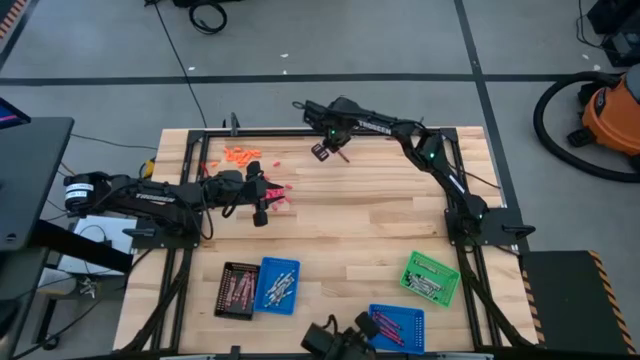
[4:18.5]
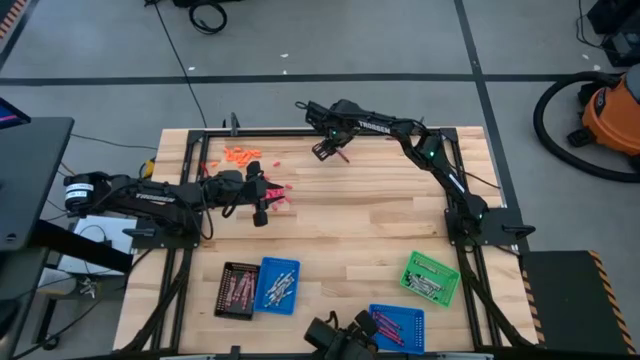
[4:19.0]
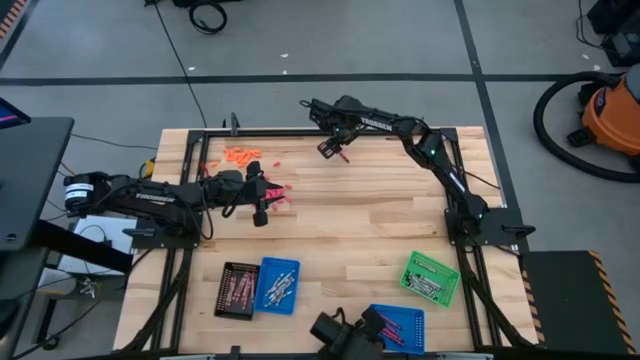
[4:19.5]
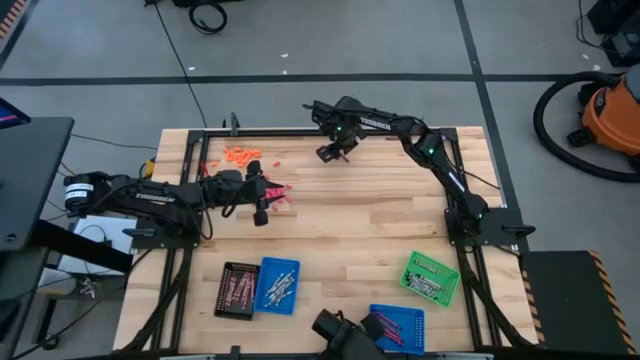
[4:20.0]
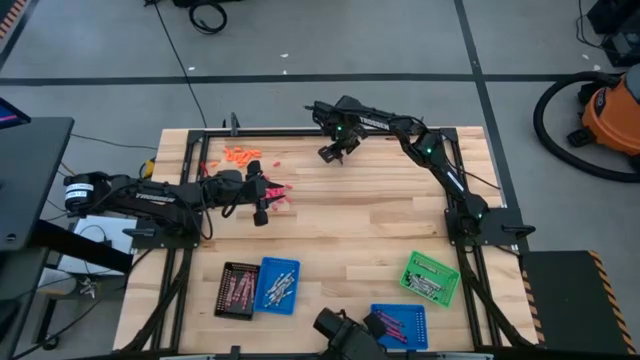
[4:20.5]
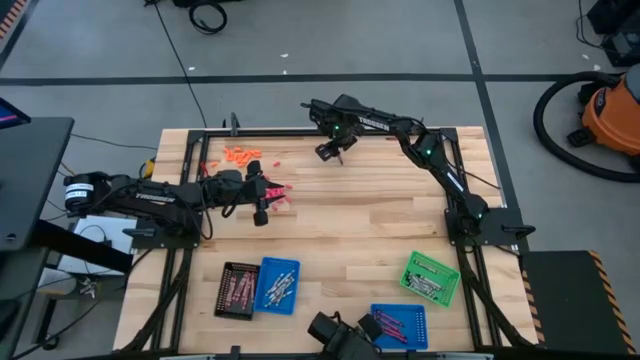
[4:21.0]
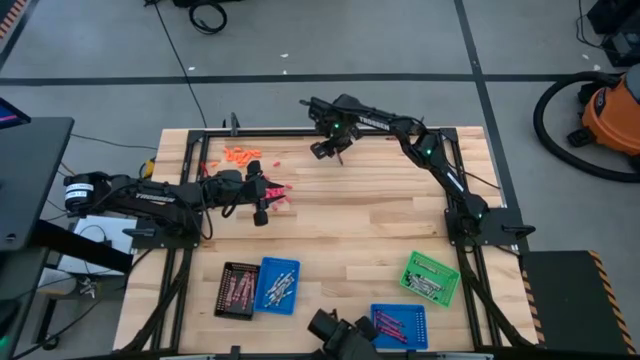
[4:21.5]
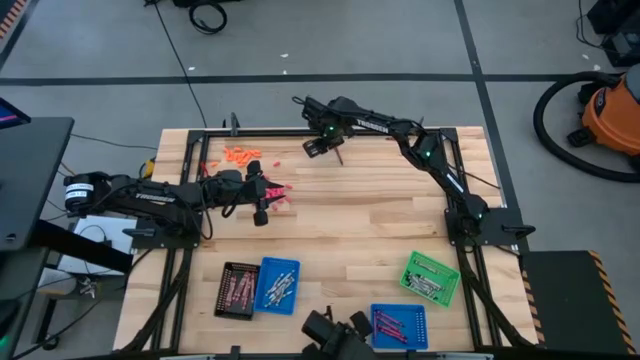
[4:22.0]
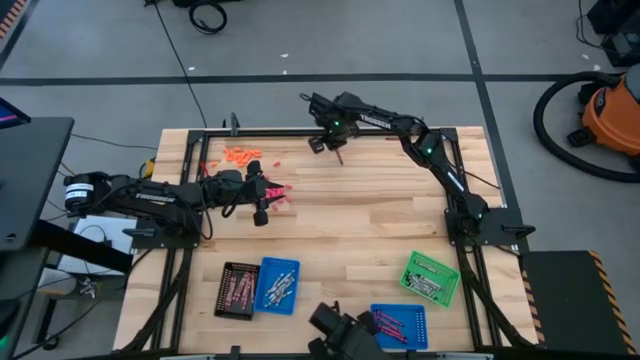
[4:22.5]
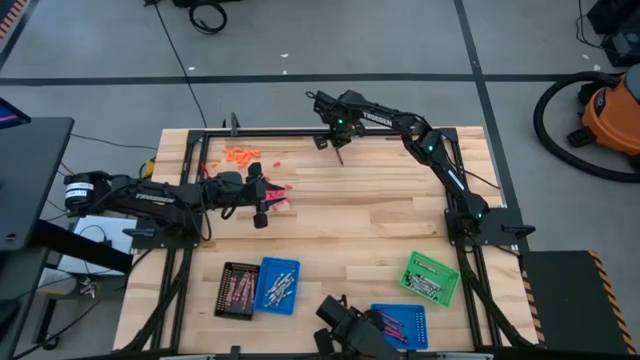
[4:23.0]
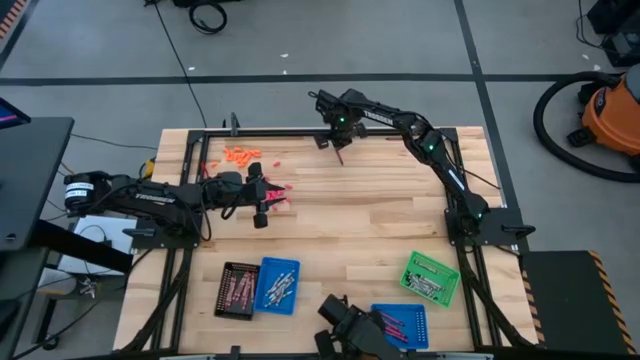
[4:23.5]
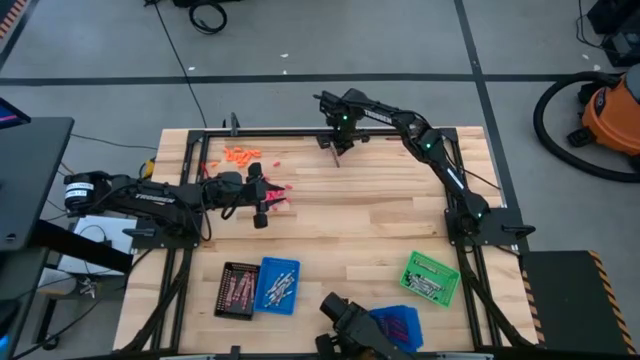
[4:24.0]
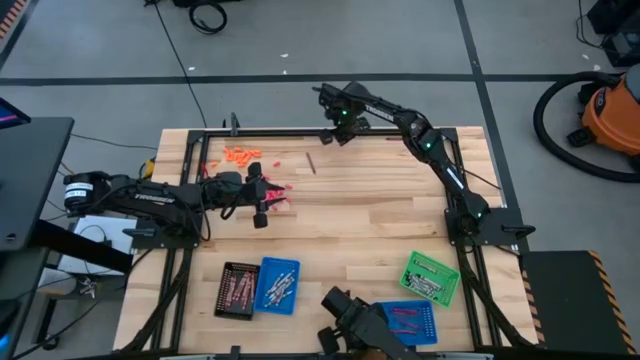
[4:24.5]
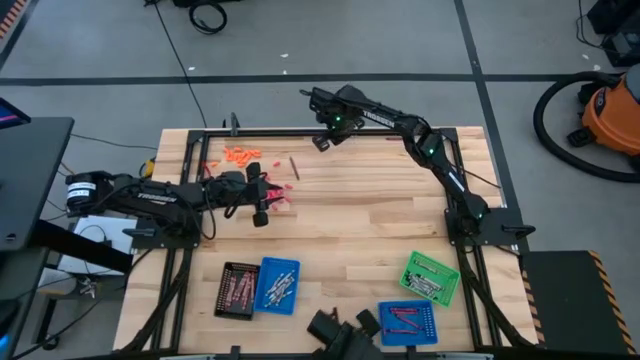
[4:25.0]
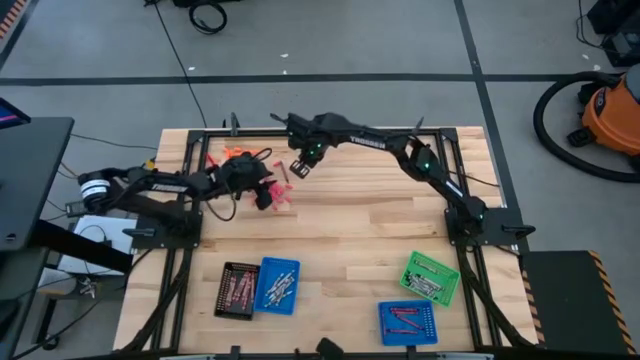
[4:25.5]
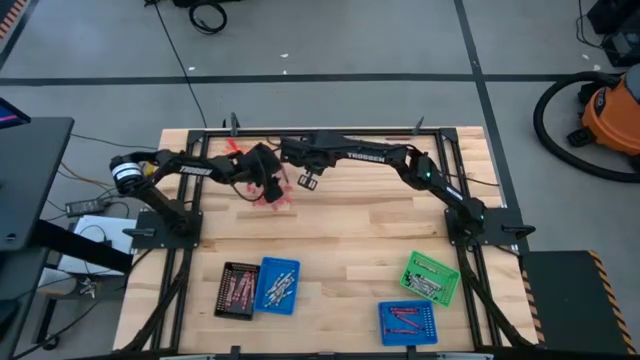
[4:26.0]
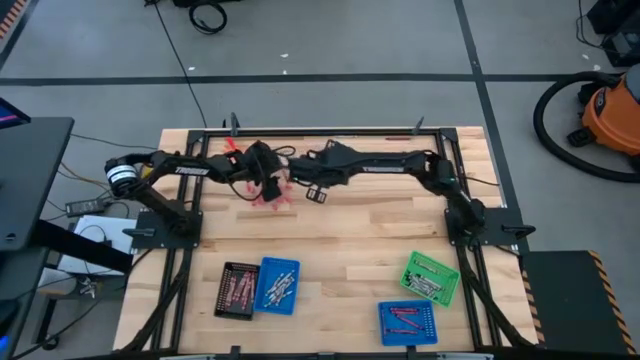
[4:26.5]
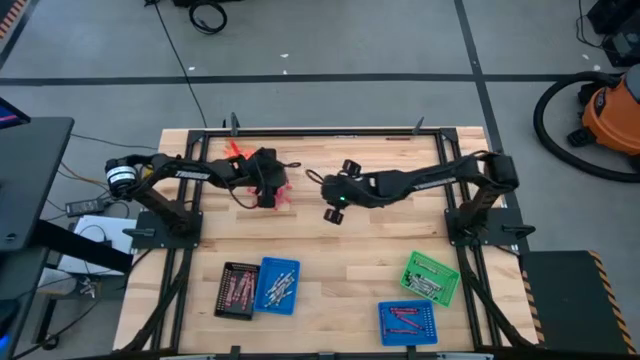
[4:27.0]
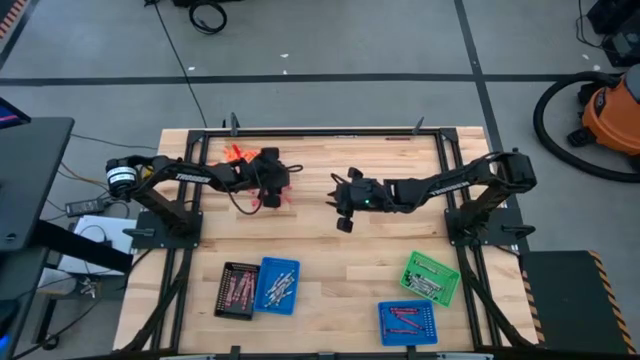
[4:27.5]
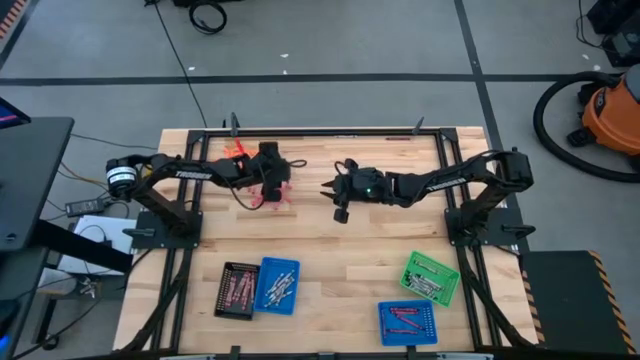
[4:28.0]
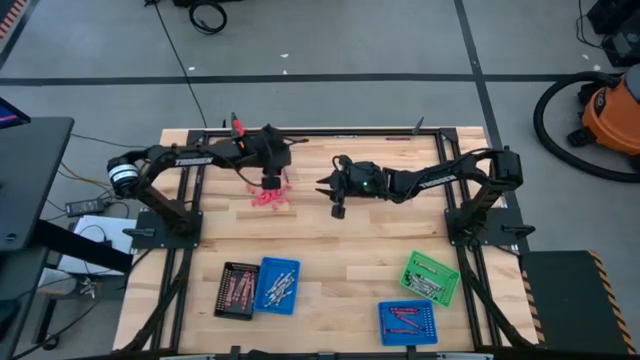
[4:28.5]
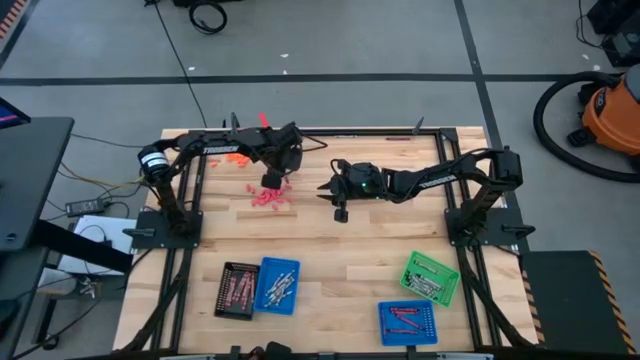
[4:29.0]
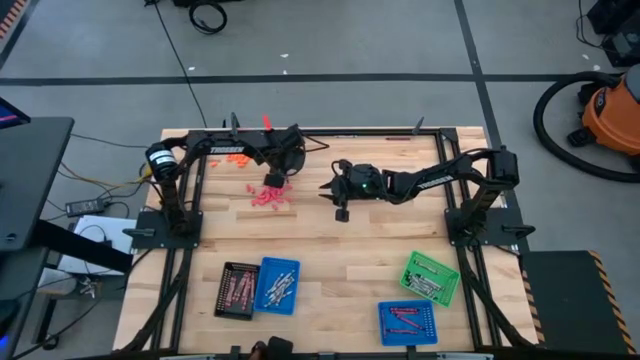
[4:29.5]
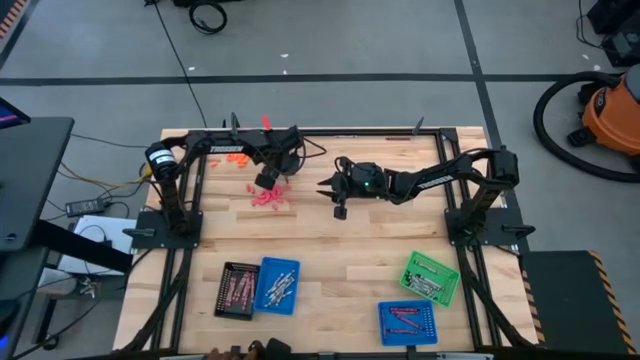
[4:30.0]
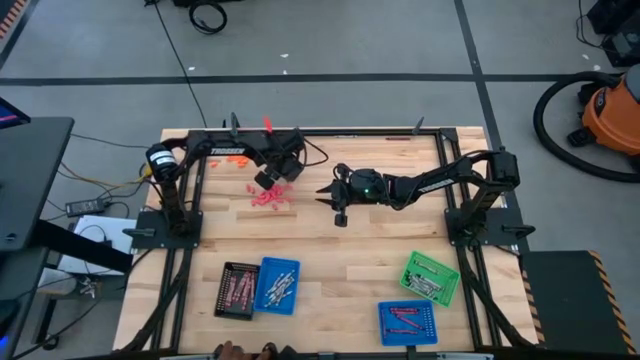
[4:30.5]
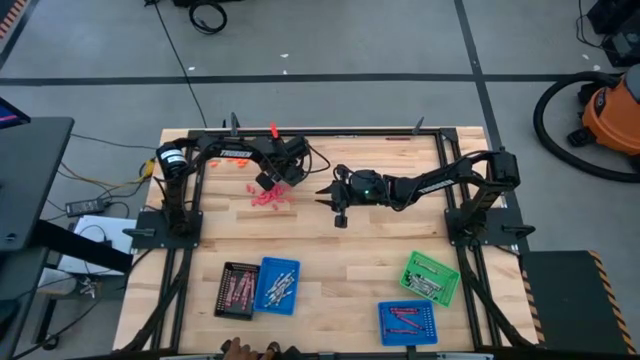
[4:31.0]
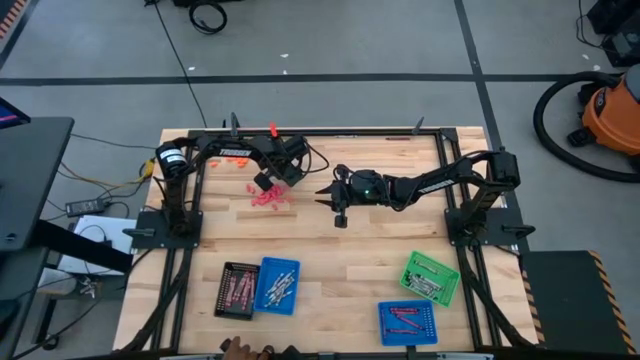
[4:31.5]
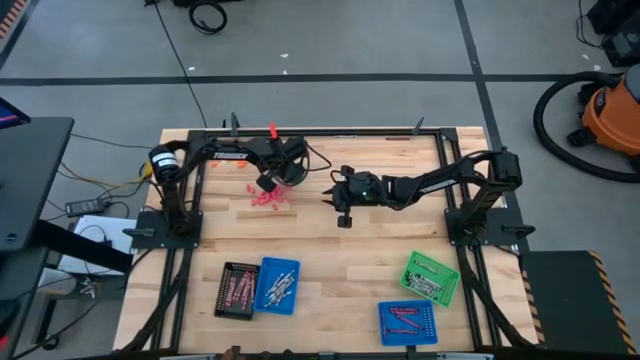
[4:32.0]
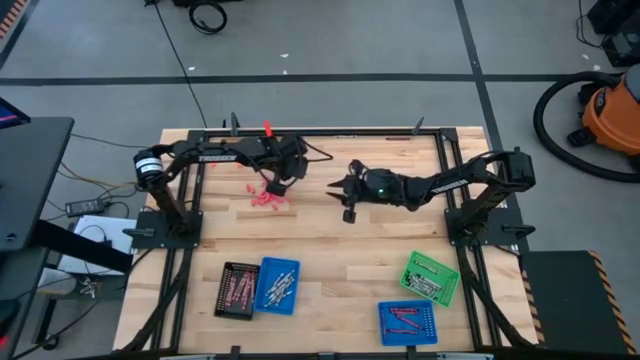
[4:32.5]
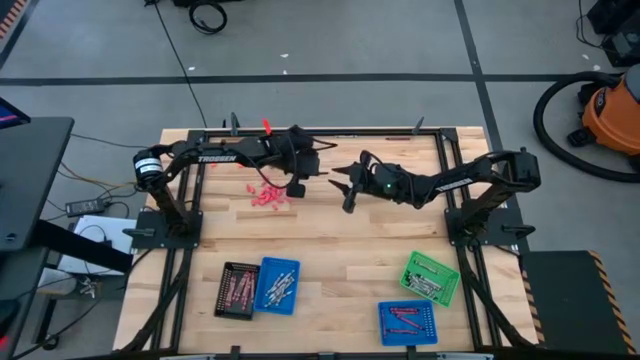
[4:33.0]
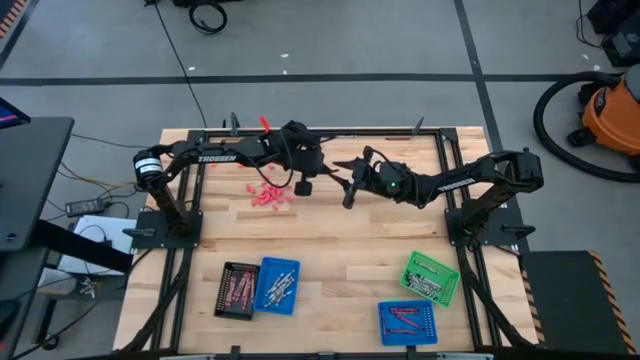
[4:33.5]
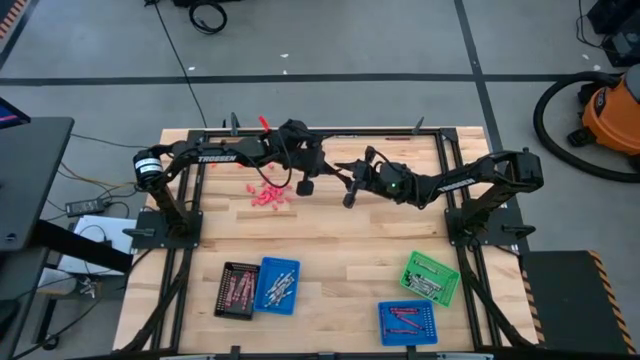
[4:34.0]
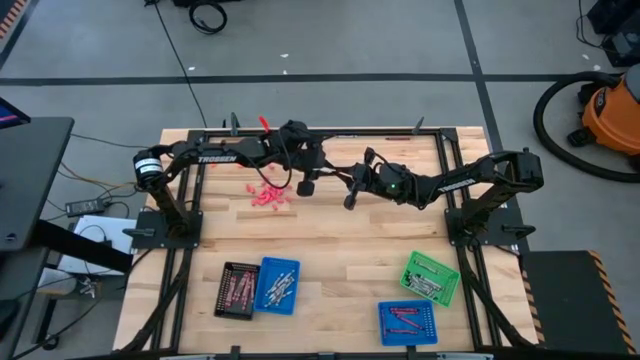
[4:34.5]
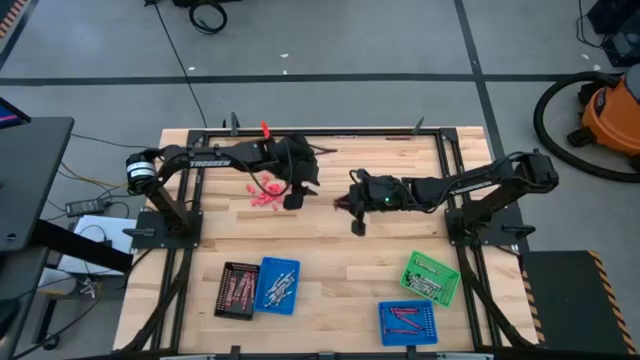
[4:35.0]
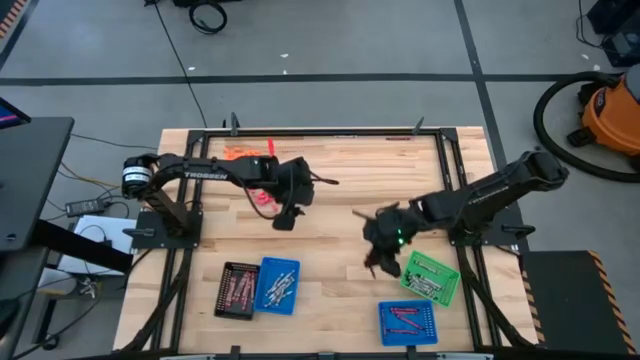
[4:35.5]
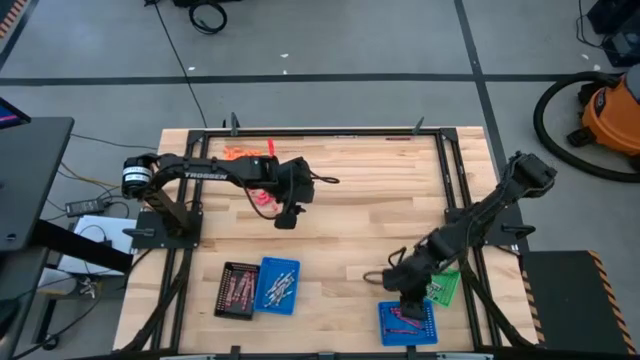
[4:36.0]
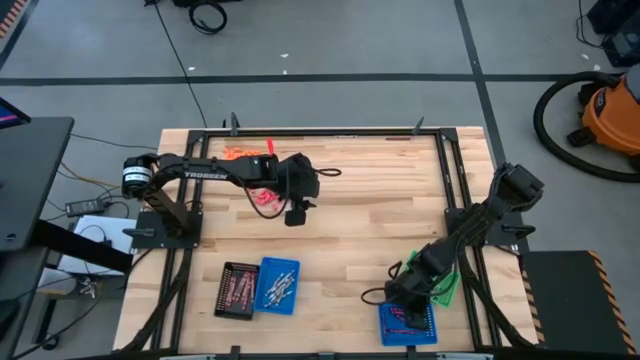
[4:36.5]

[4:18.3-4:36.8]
Task: Sort crayons
Put the red crayon into the right blue bin

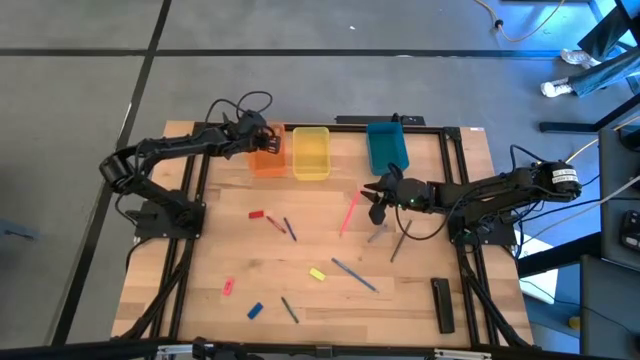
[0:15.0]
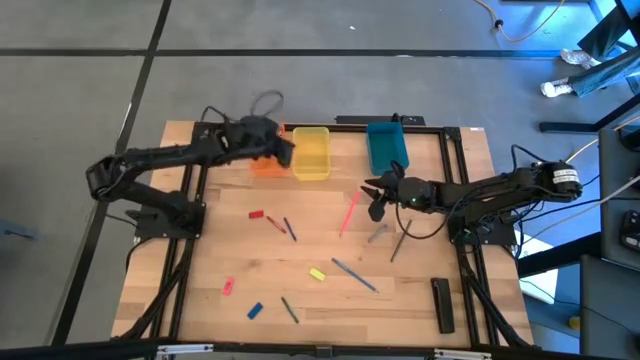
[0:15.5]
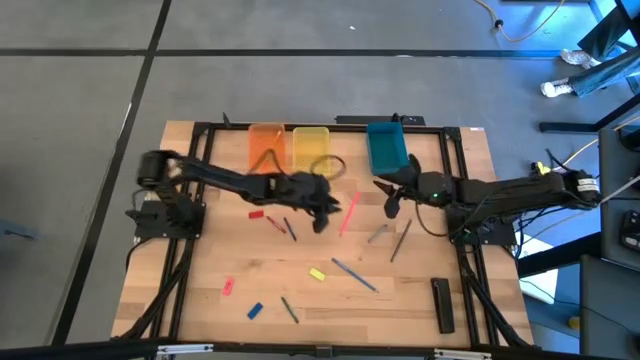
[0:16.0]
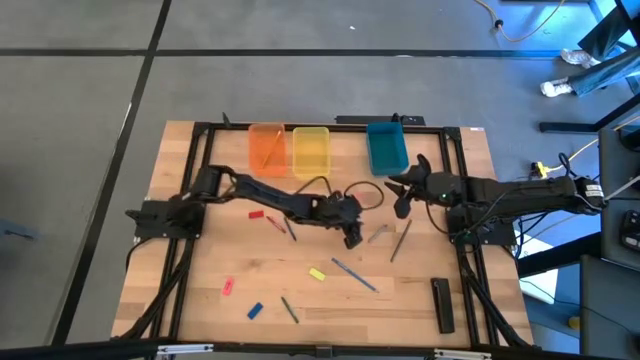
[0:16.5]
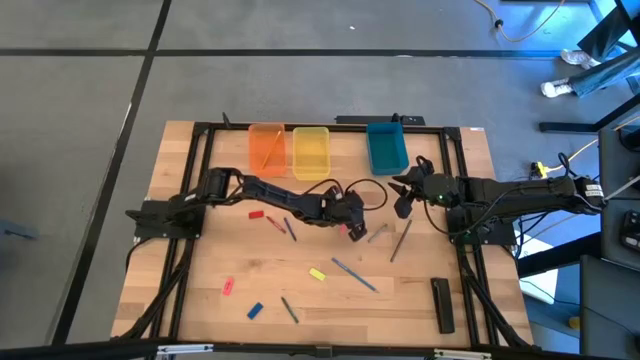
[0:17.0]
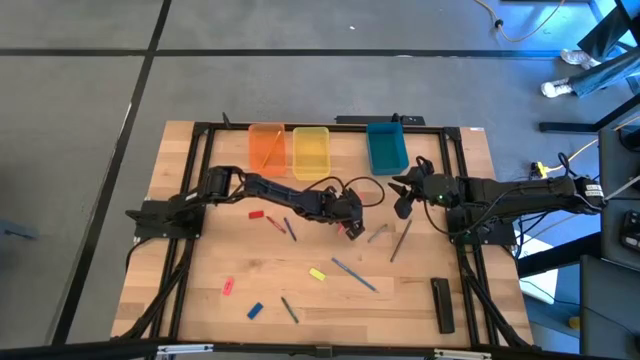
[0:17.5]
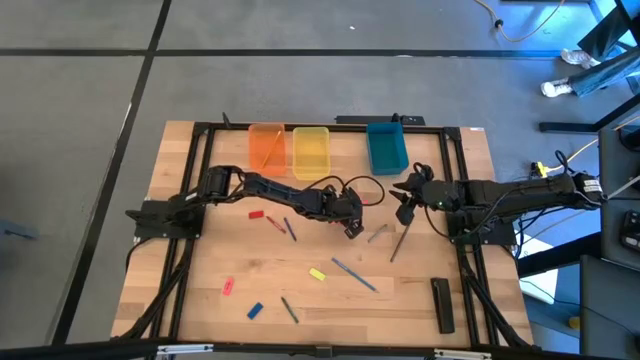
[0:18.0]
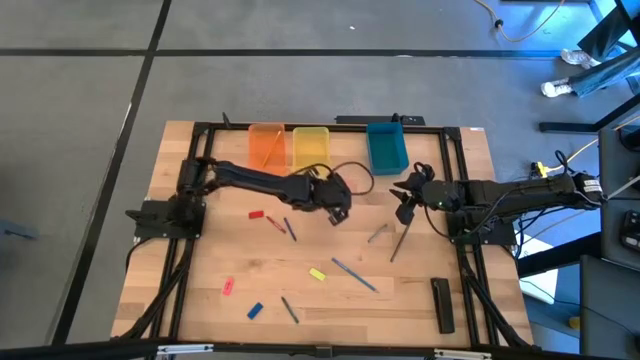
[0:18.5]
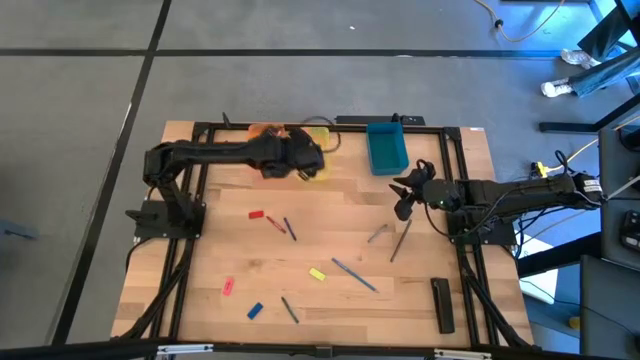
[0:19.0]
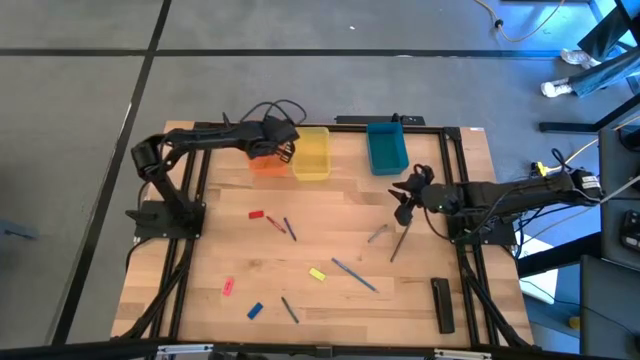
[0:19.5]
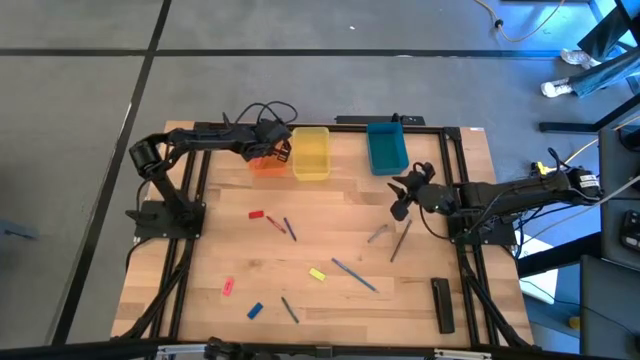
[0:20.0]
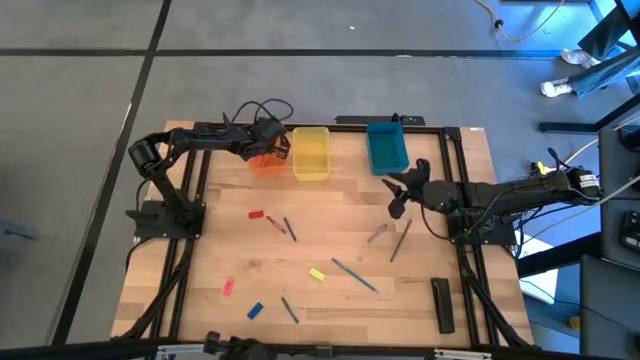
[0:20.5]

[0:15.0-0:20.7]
Task: Sort crayons/erasers/pens/pencils in bins
Put the pink pencil into the orange bin
